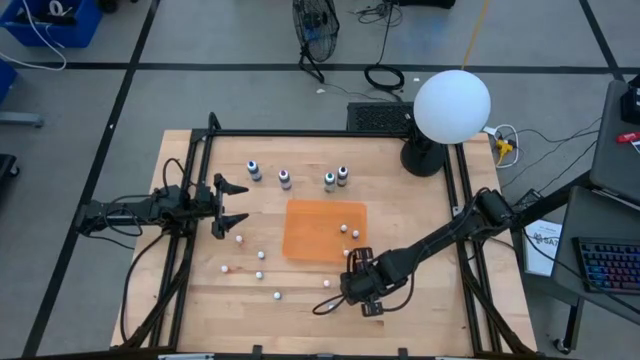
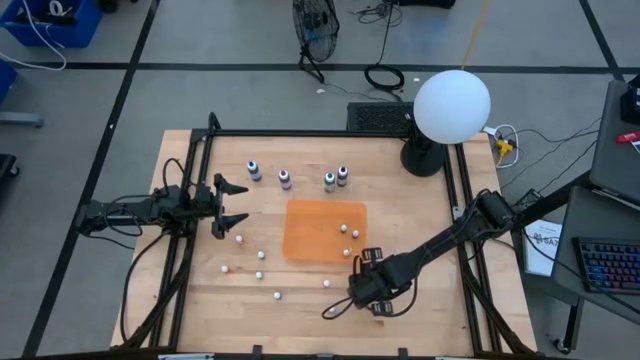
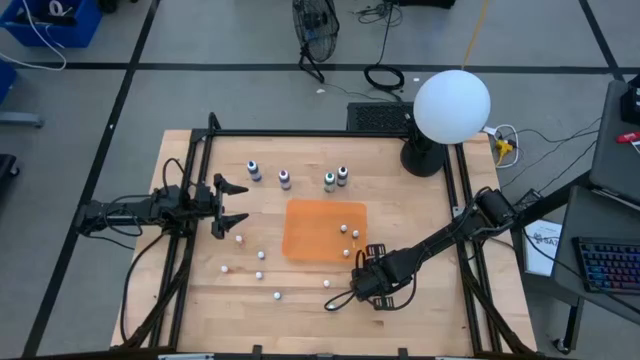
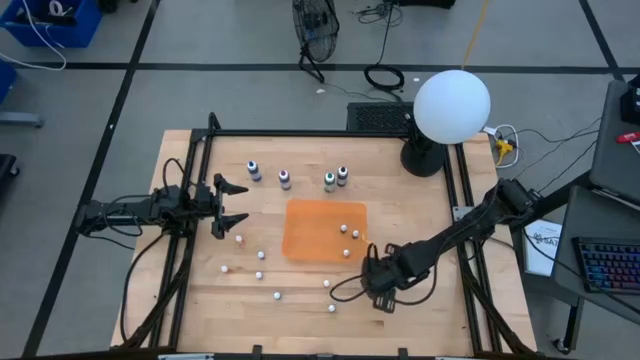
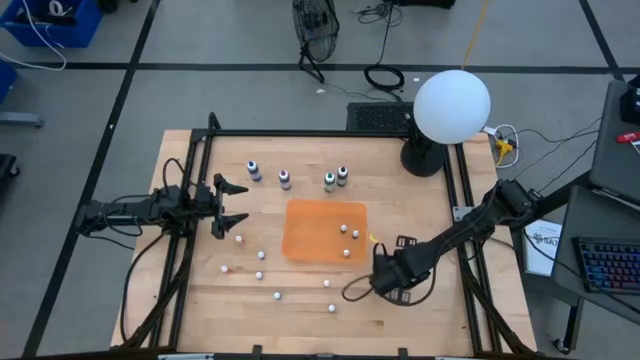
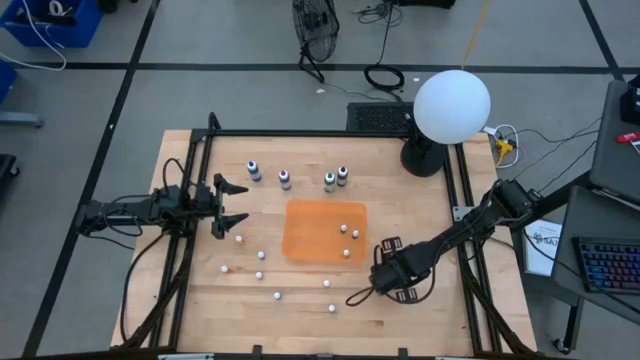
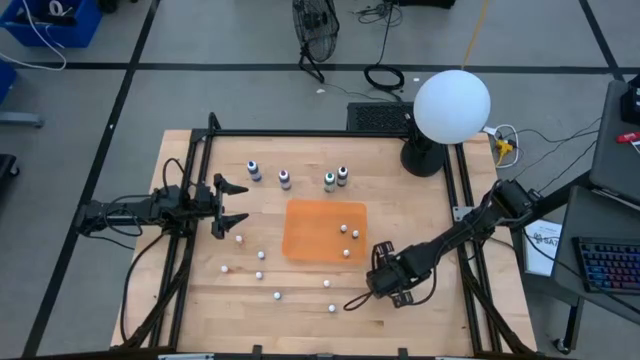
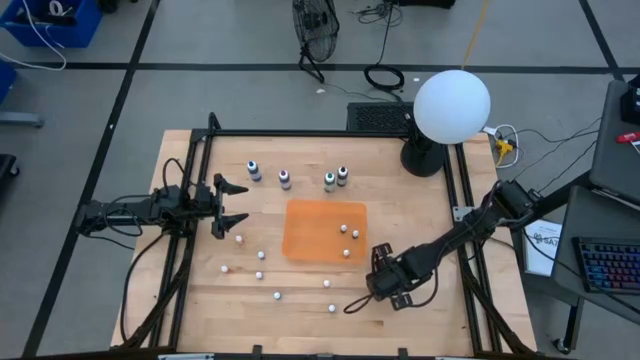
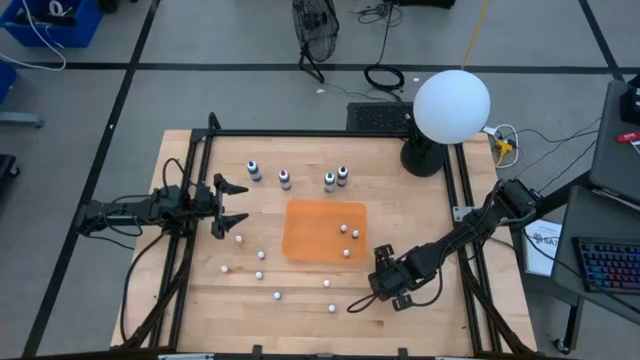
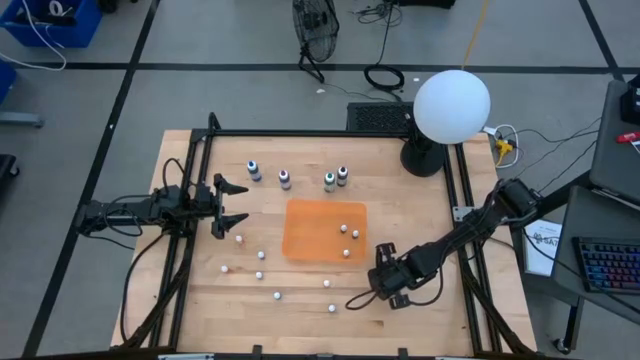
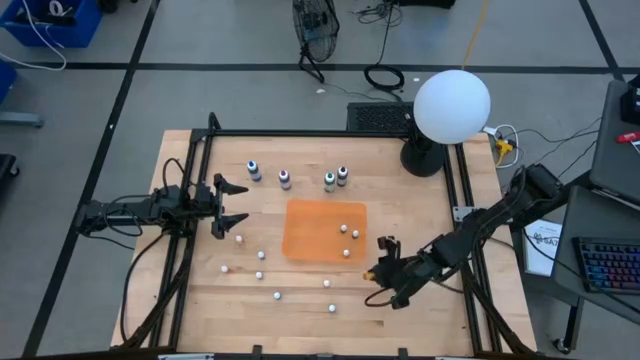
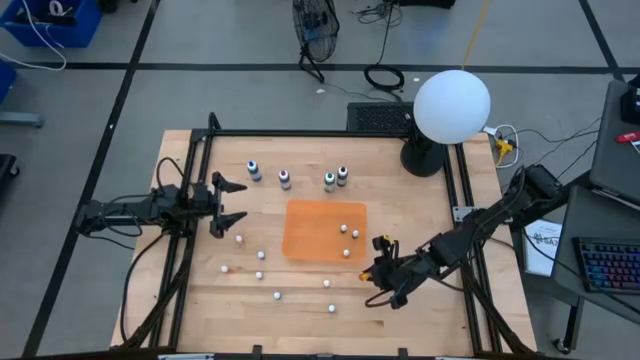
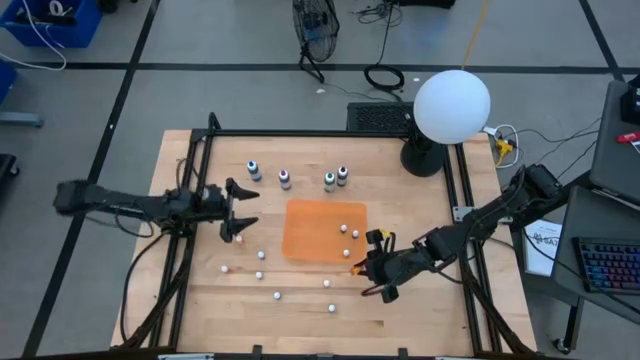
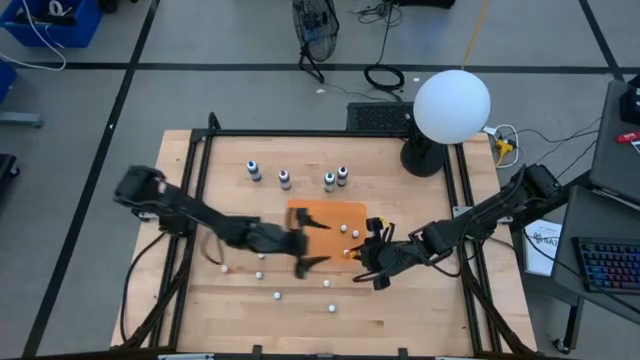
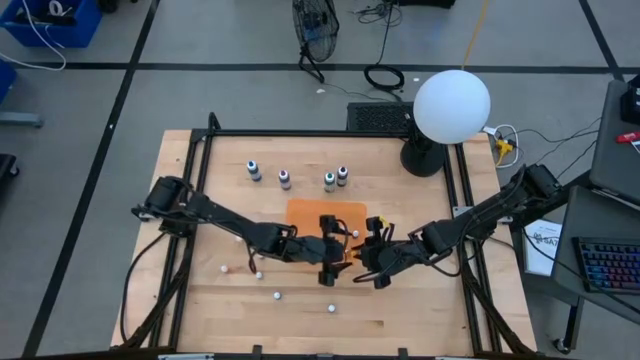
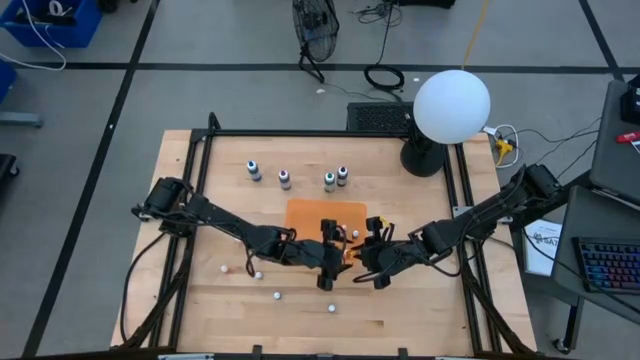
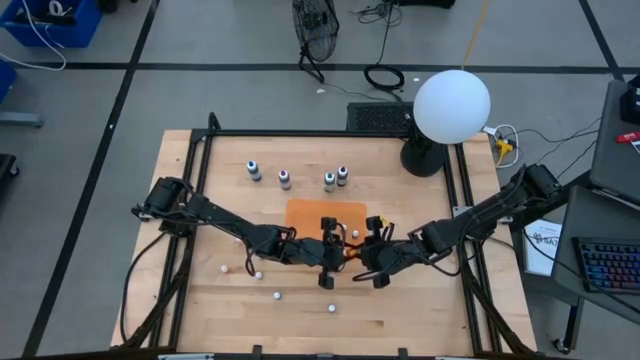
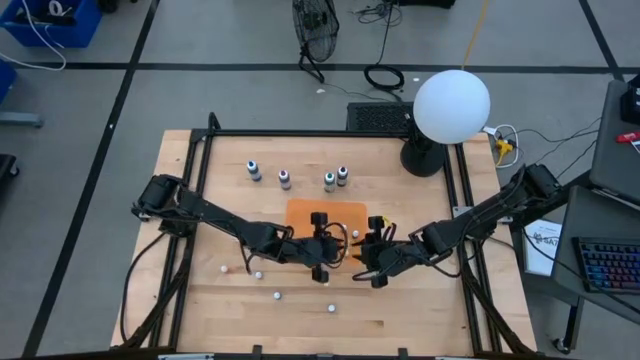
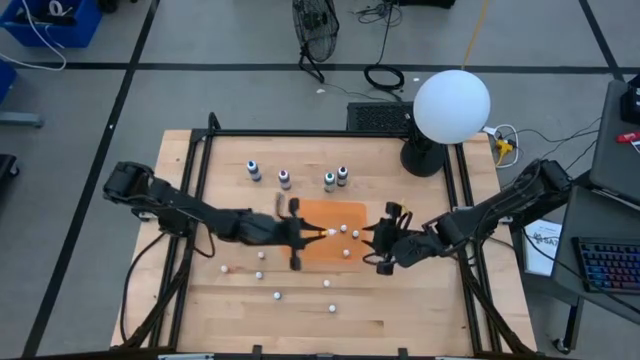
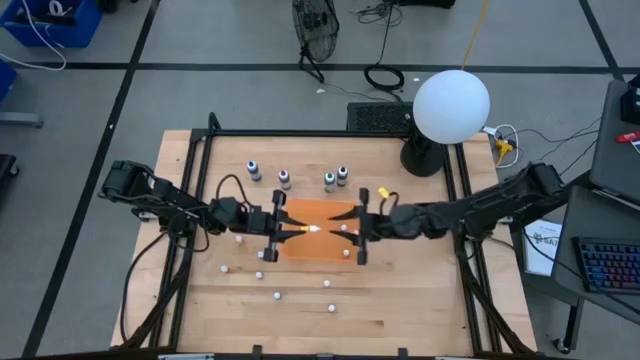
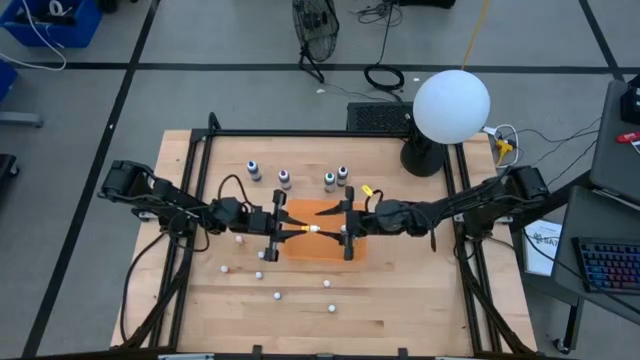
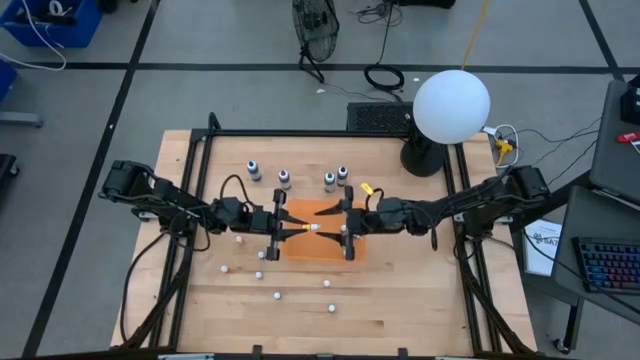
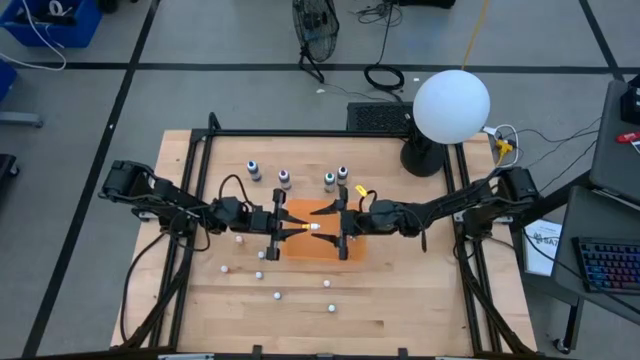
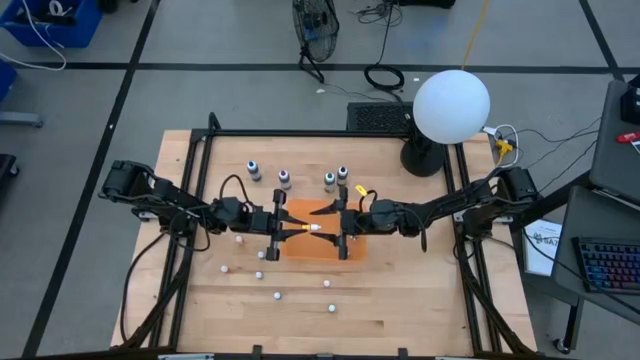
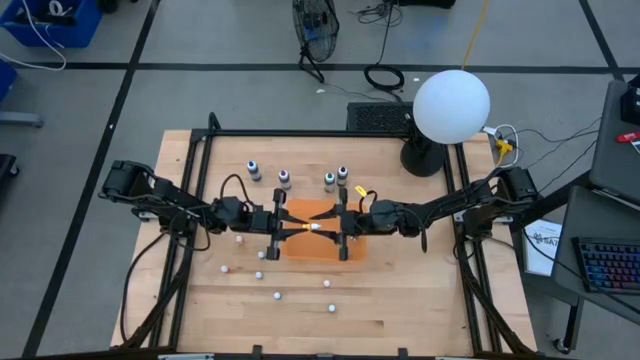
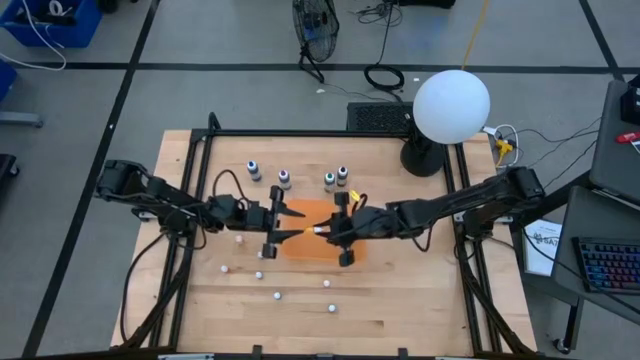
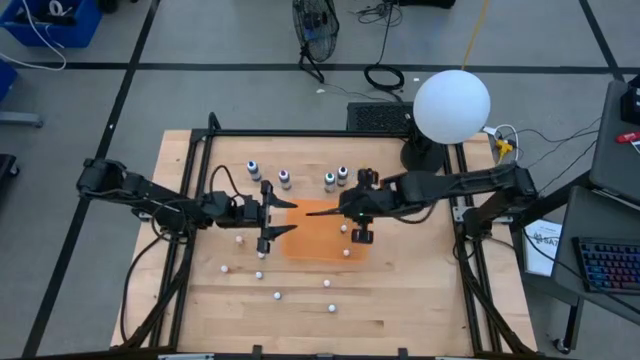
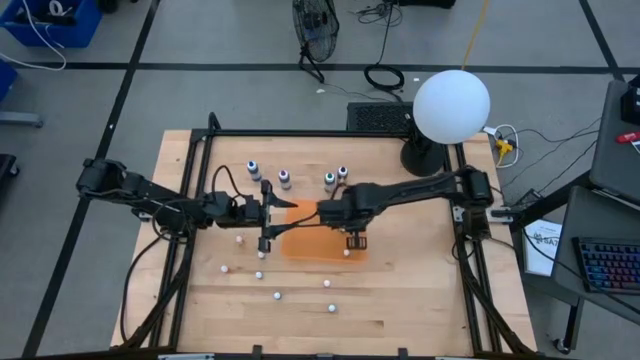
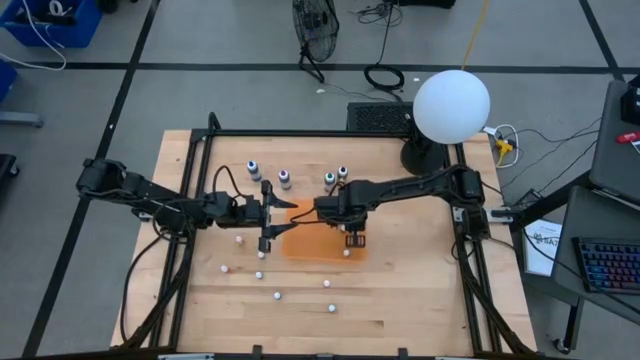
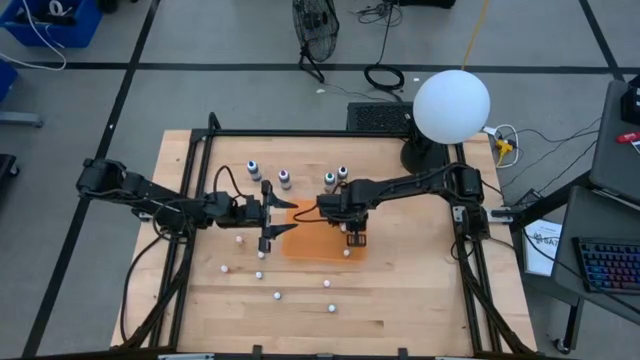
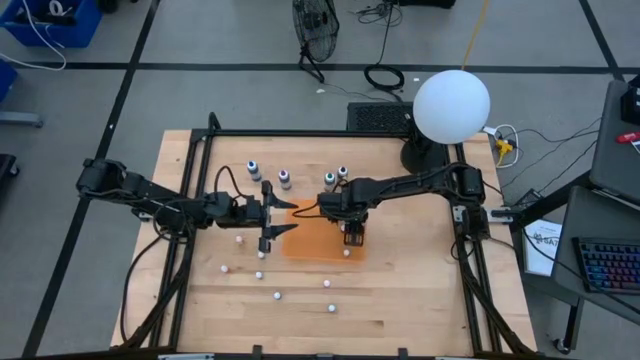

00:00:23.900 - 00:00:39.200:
Task: Pick & Place food coloring
Put the small orange food coloring bottle into the orange bin

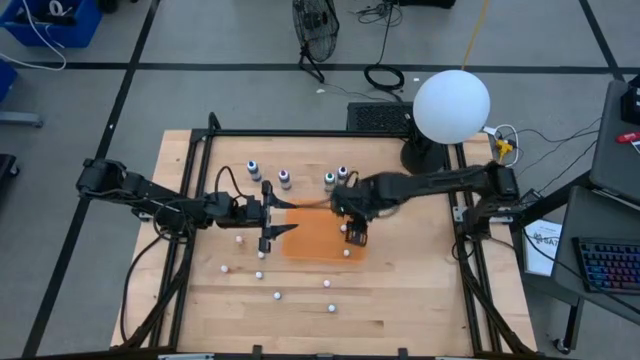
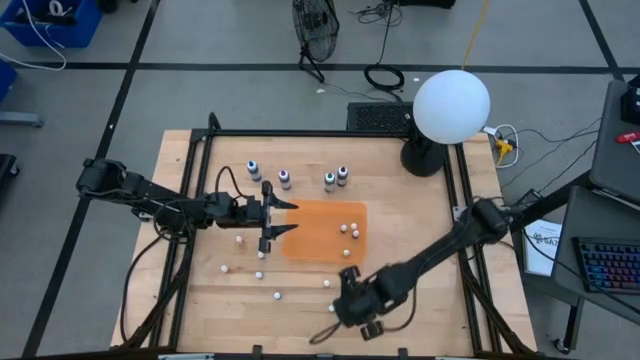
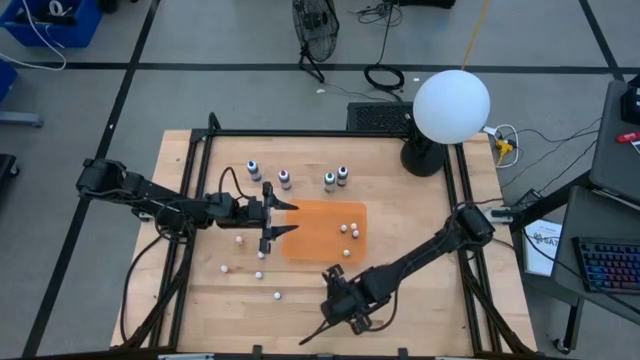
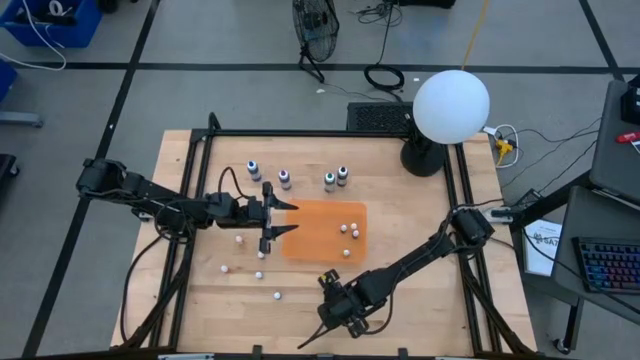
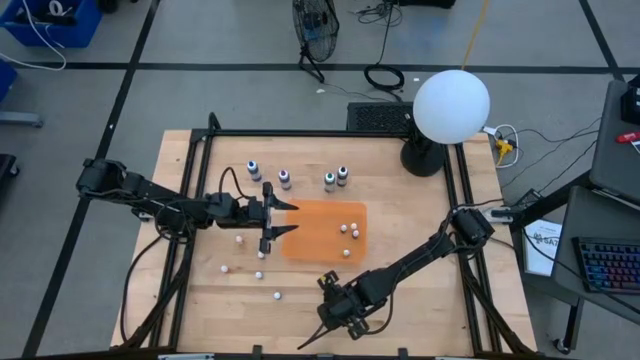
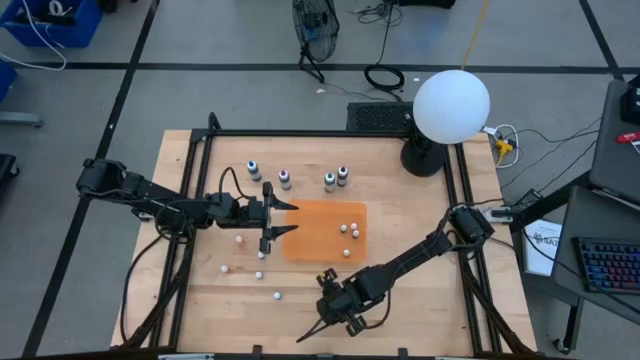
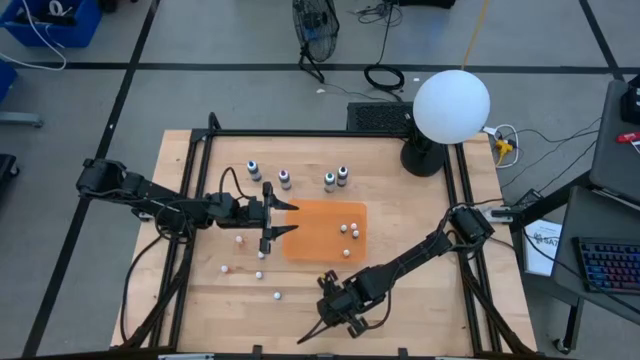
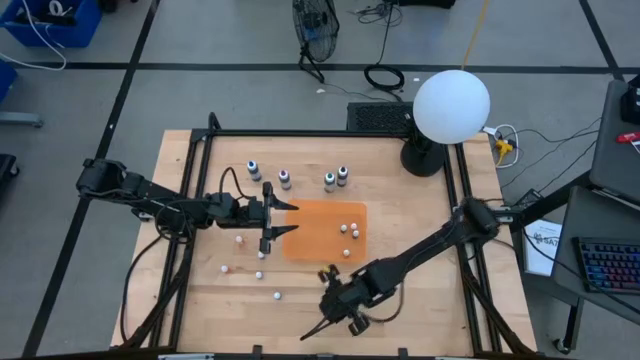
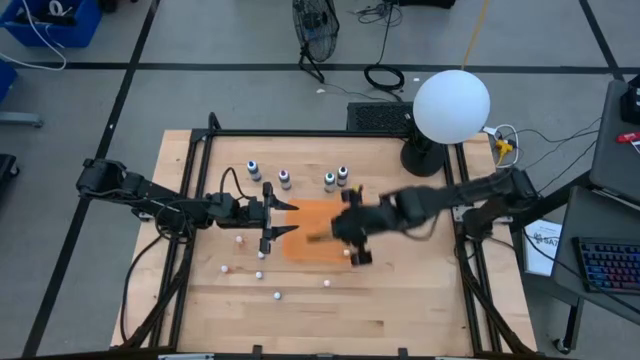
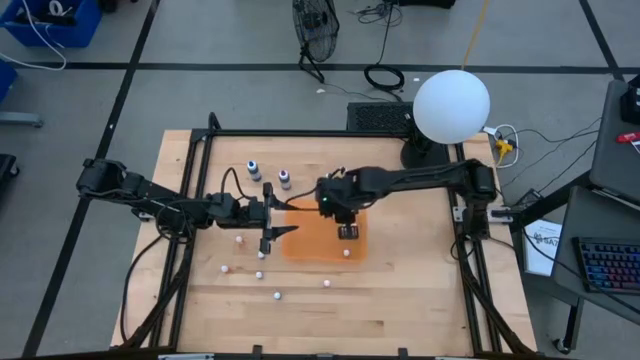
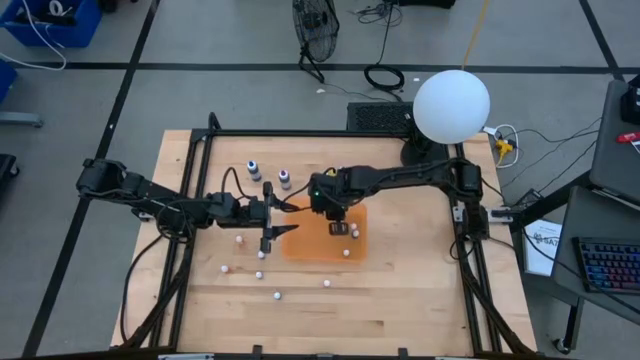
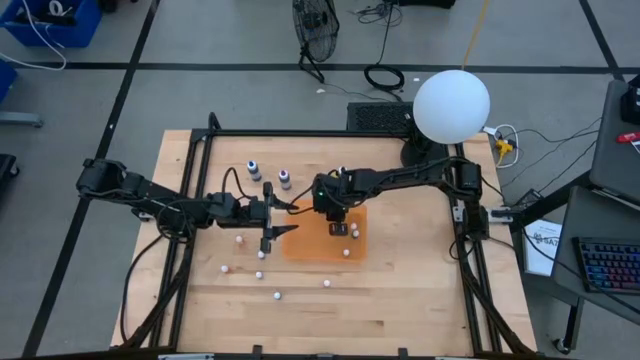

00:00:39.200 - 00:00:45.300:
Put the small purple food coloring bottle into the orange bin
